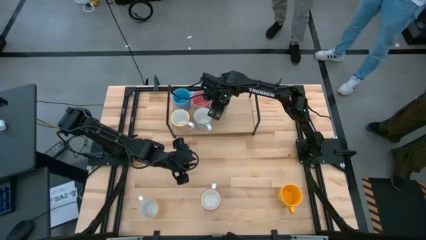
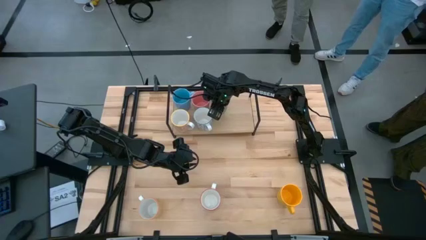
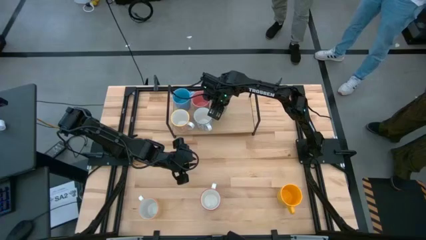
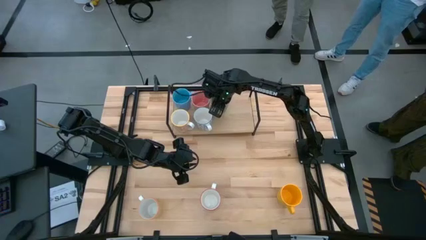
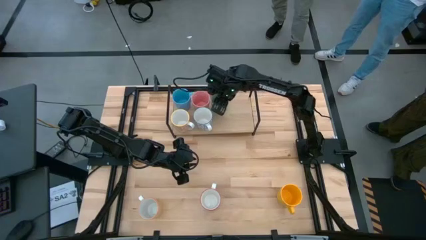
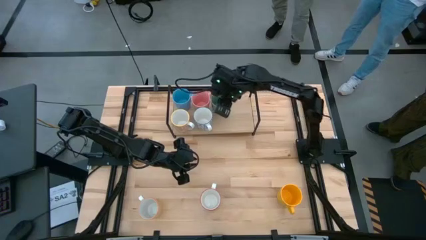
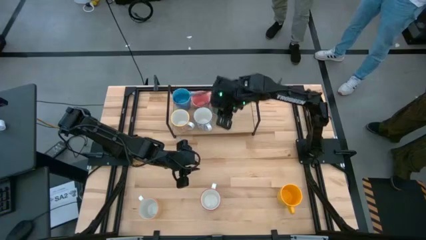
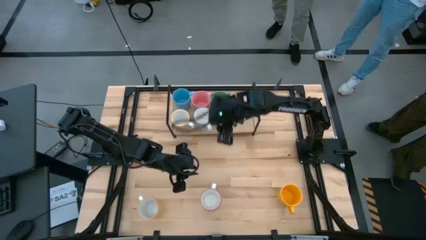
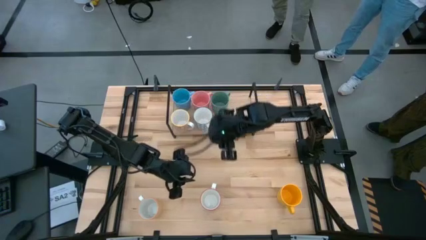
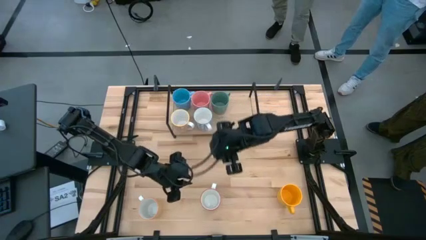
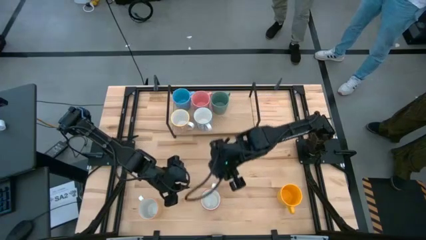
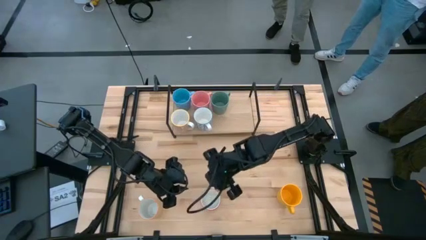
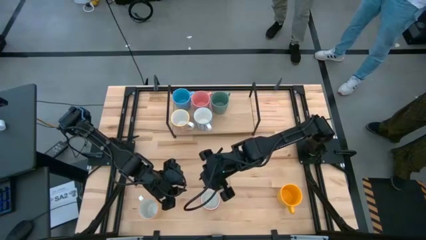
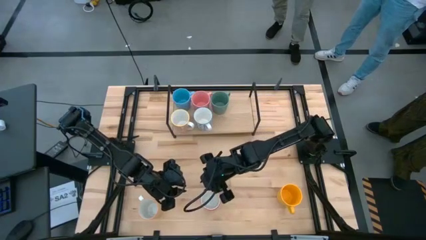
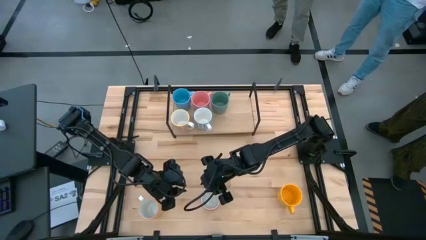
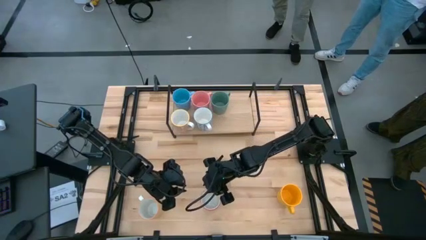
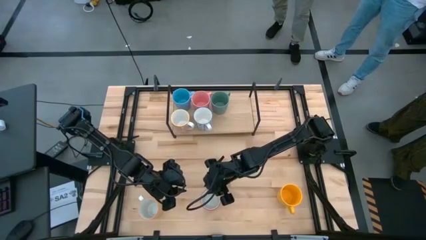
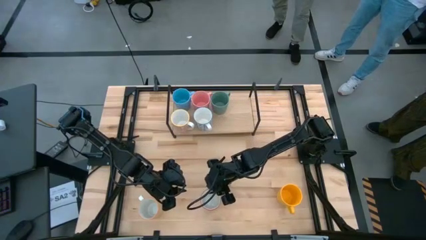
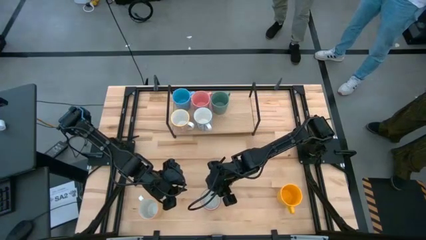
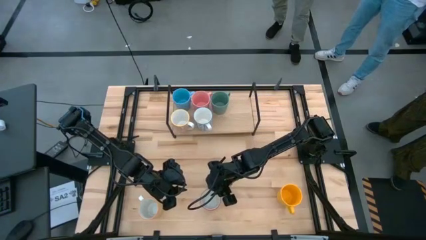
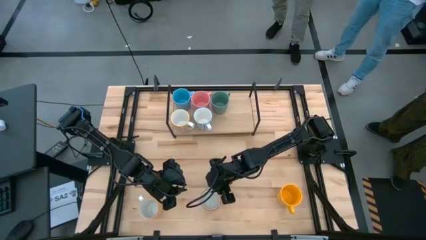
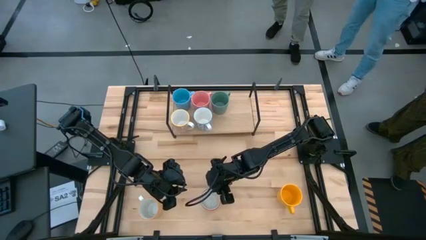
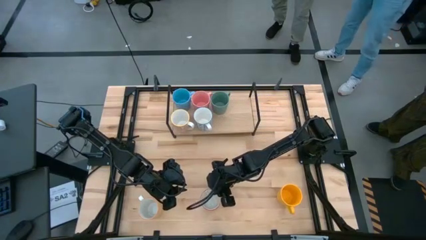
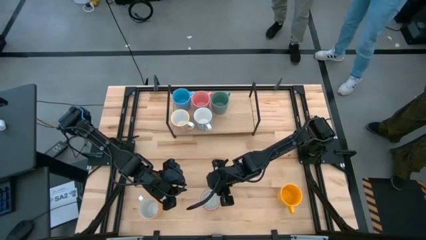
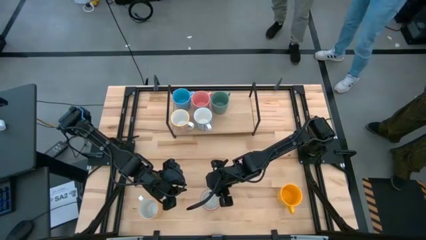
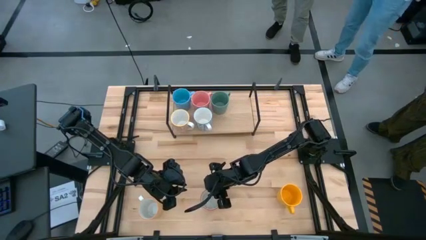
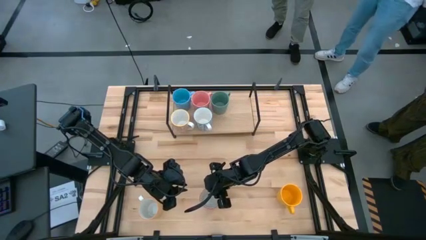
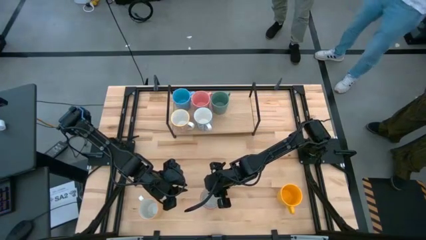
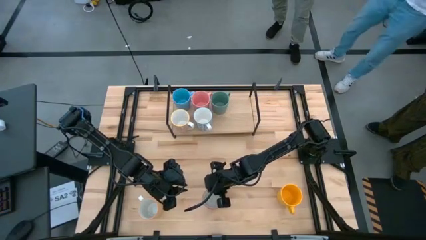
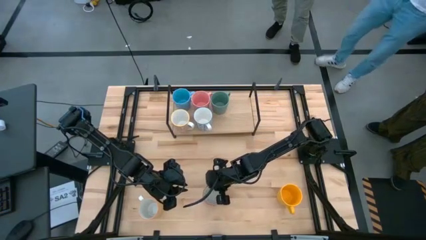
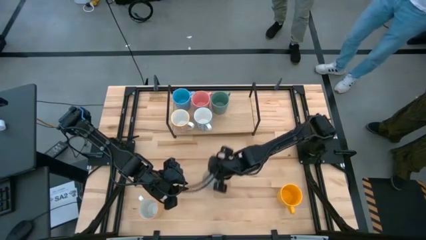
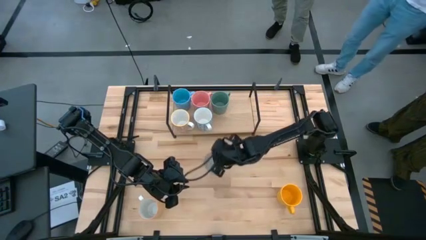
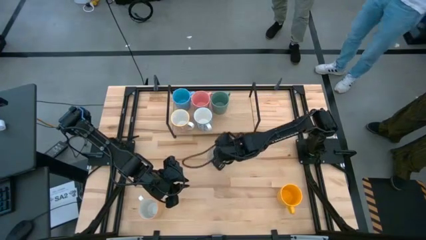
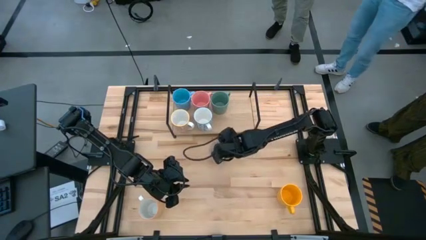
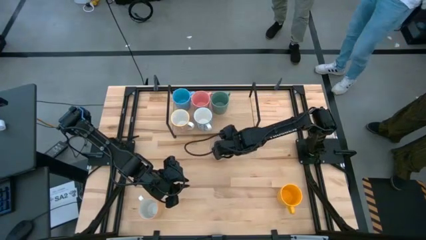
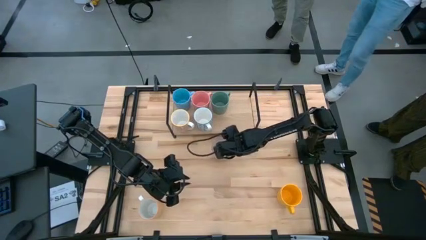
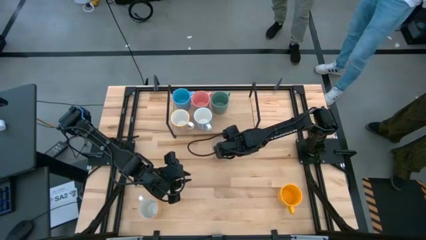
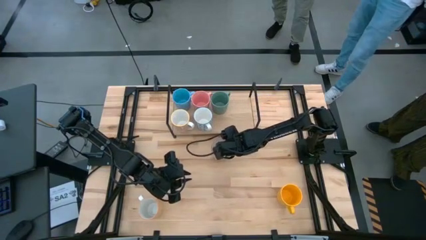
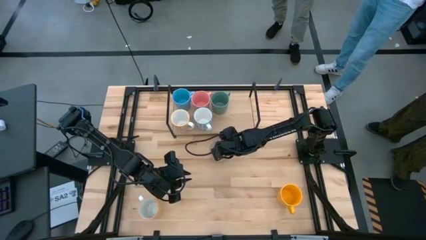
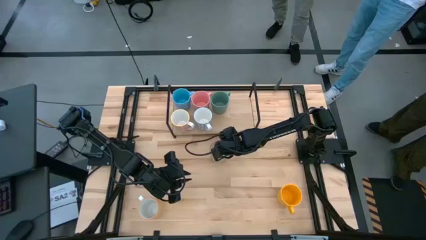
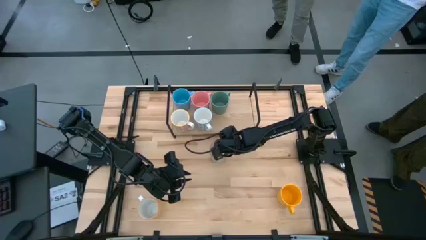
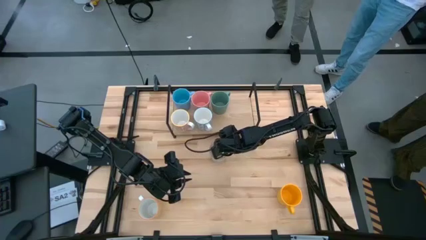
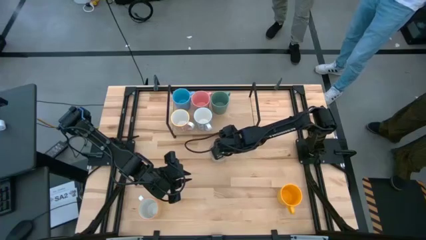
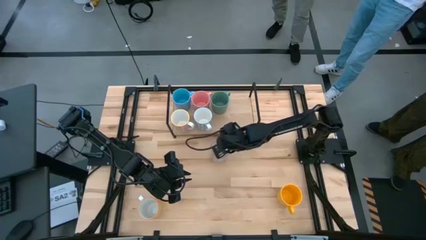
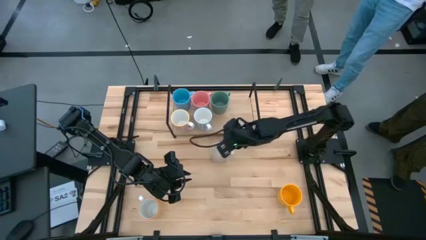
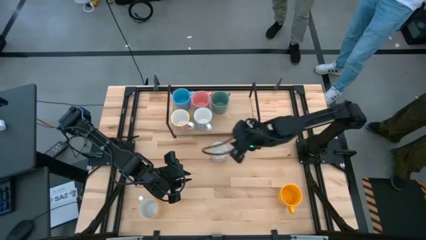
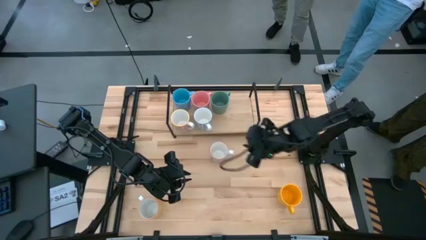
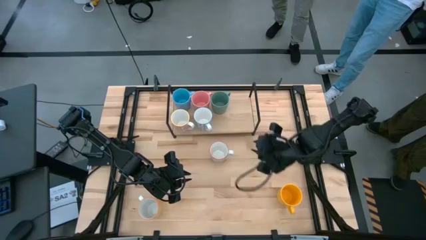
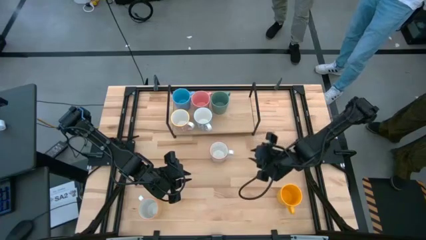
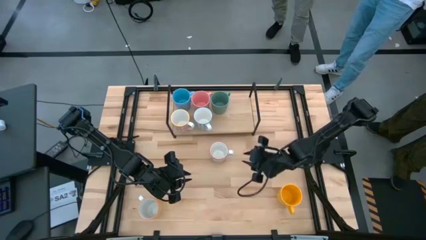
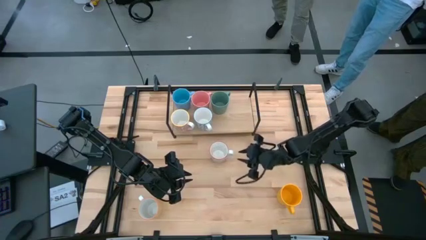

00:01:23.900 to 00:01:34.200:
Task: Place coffee mugs
Put the gray patterned mug on the shelf
